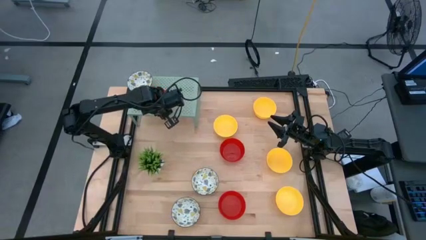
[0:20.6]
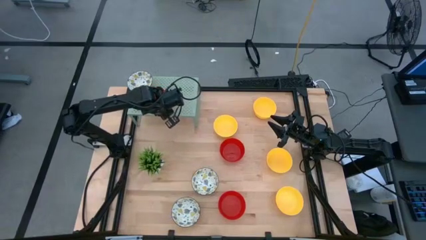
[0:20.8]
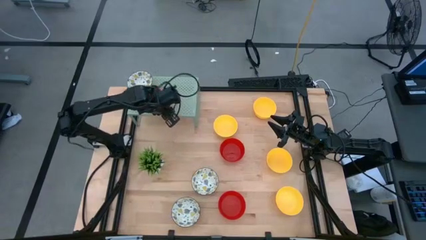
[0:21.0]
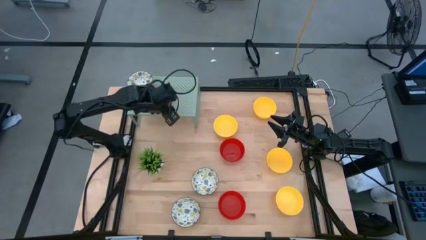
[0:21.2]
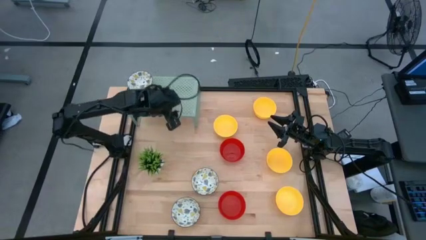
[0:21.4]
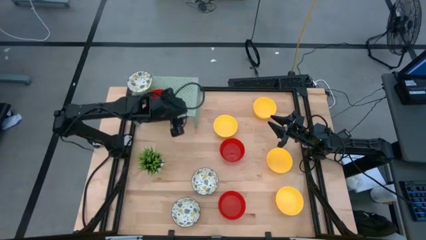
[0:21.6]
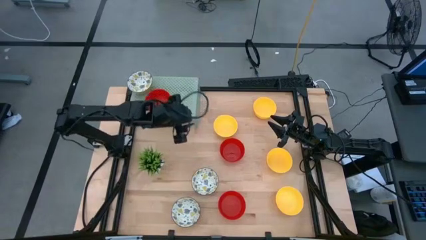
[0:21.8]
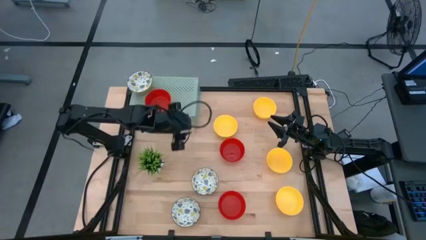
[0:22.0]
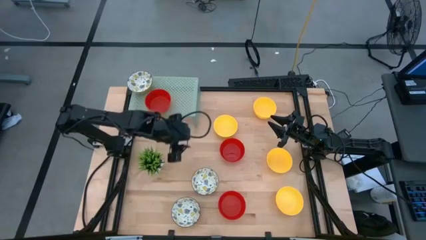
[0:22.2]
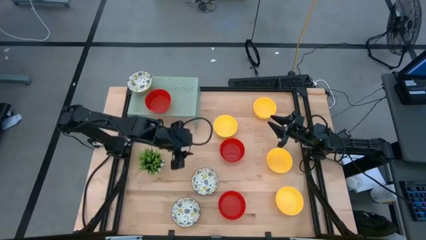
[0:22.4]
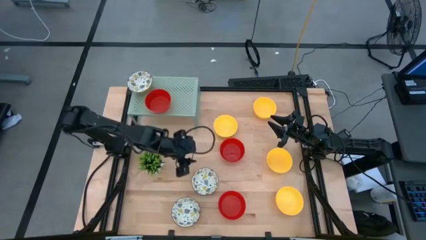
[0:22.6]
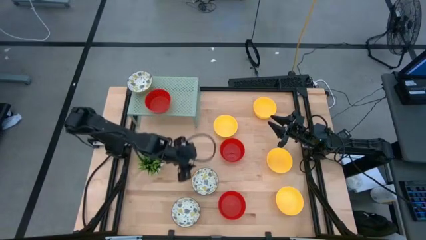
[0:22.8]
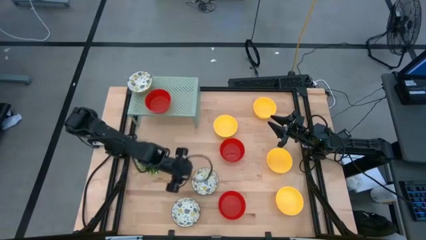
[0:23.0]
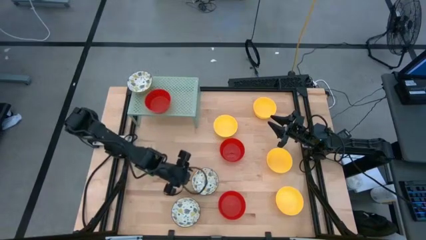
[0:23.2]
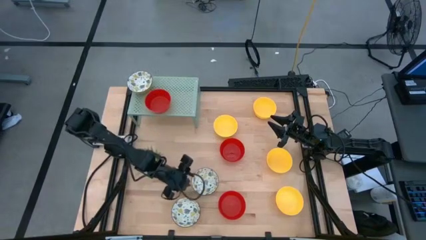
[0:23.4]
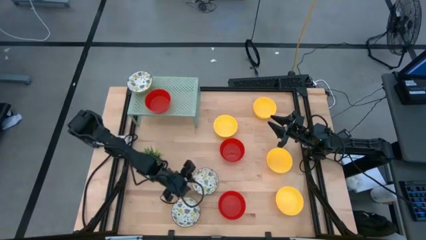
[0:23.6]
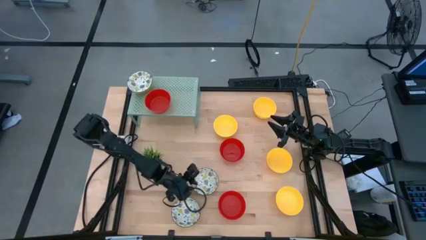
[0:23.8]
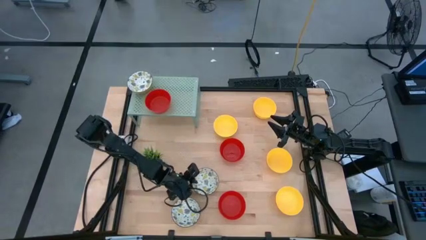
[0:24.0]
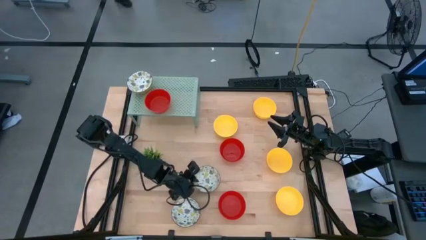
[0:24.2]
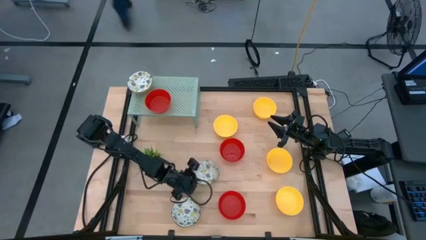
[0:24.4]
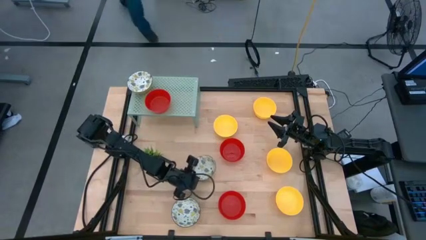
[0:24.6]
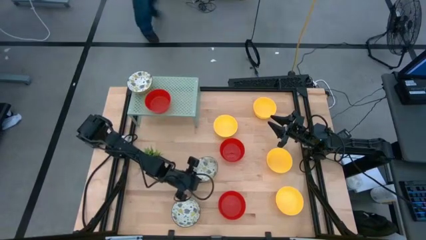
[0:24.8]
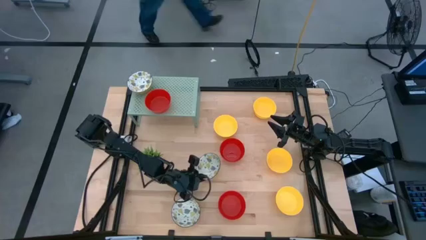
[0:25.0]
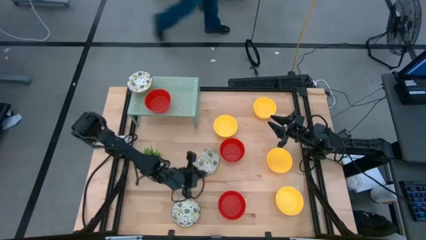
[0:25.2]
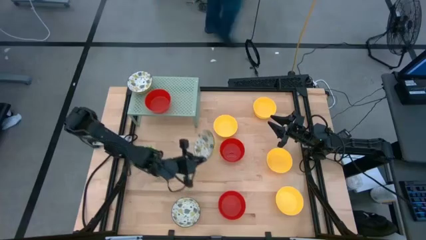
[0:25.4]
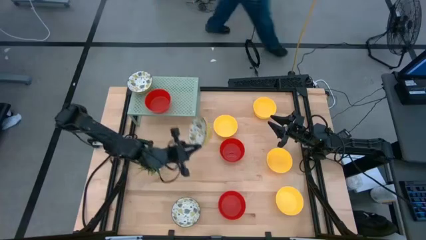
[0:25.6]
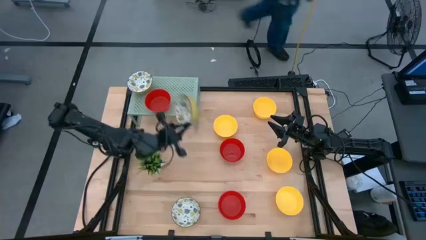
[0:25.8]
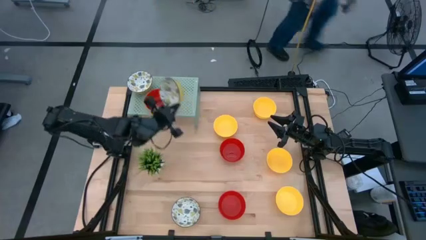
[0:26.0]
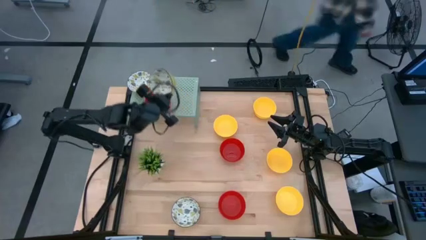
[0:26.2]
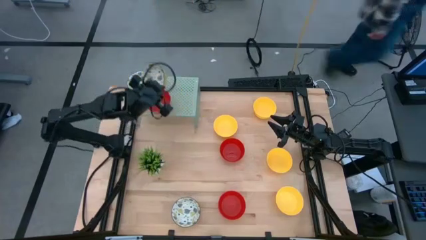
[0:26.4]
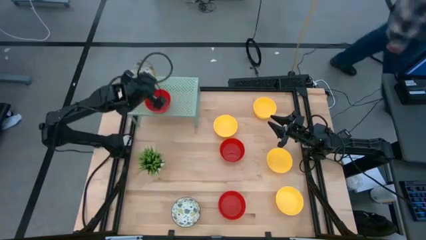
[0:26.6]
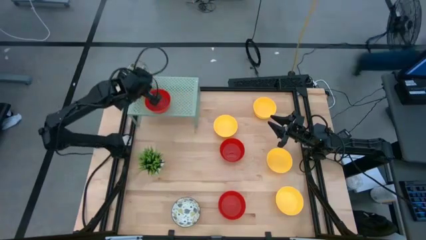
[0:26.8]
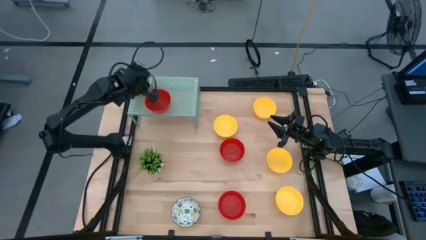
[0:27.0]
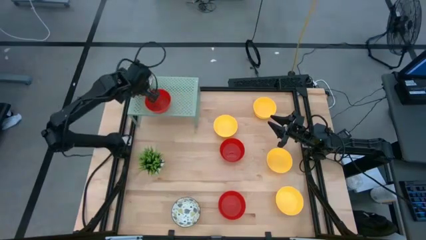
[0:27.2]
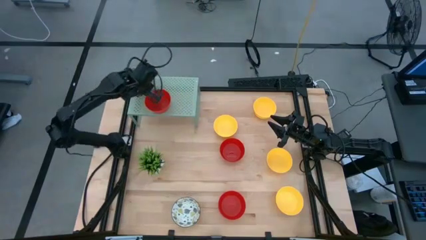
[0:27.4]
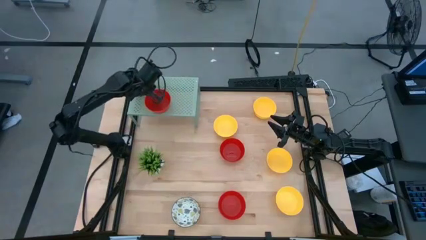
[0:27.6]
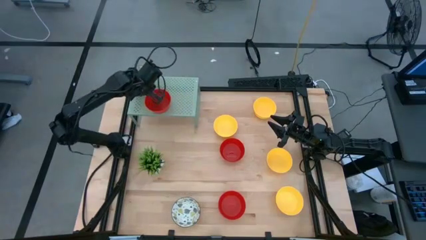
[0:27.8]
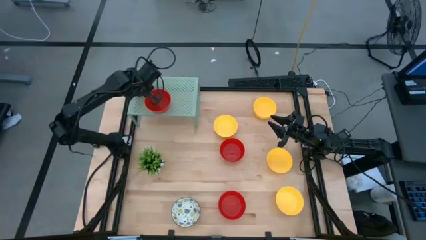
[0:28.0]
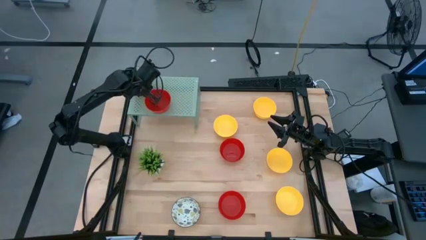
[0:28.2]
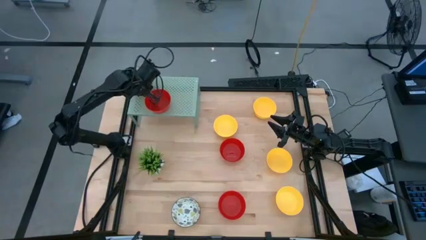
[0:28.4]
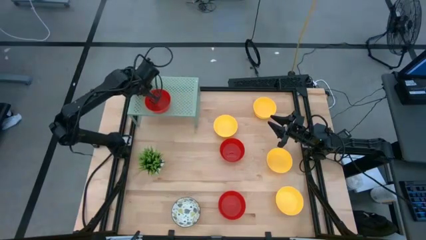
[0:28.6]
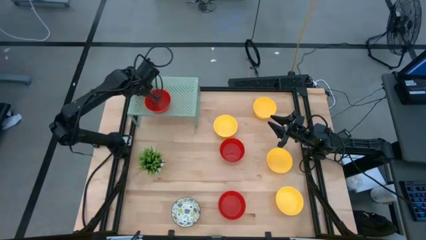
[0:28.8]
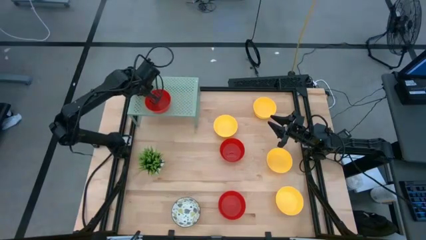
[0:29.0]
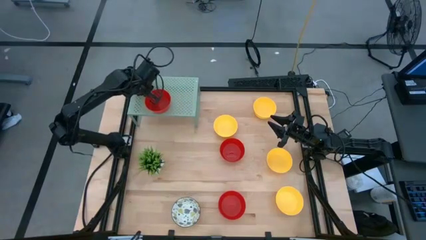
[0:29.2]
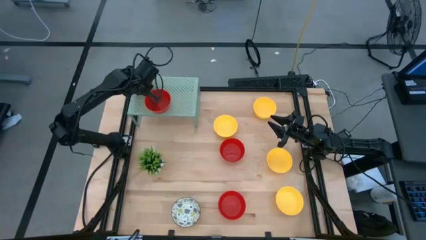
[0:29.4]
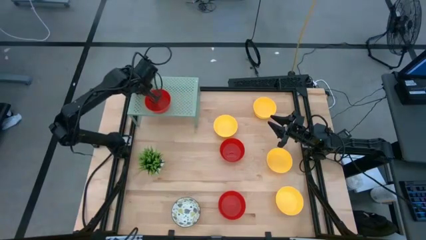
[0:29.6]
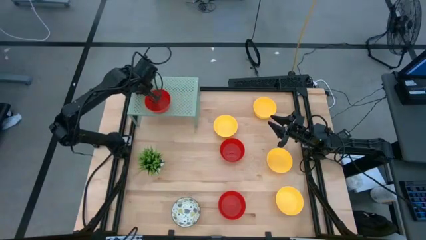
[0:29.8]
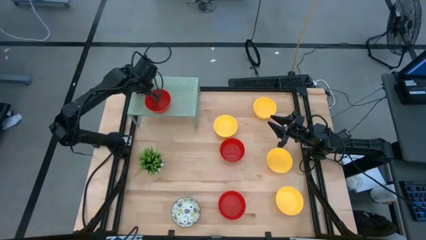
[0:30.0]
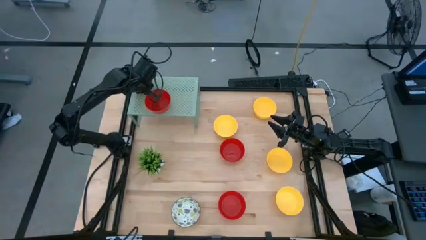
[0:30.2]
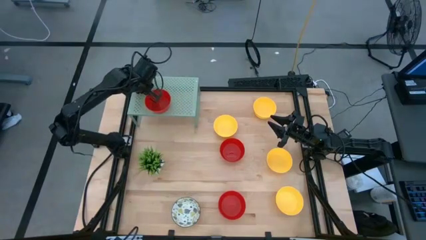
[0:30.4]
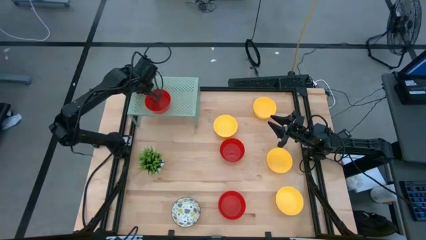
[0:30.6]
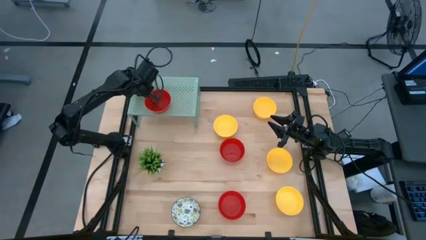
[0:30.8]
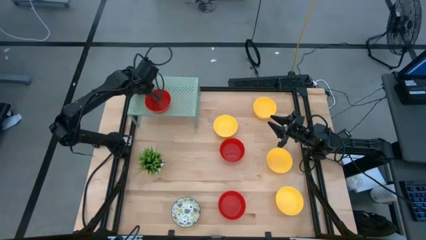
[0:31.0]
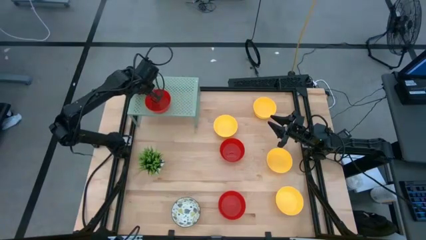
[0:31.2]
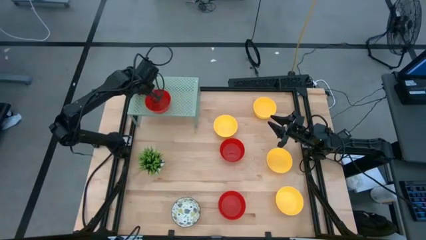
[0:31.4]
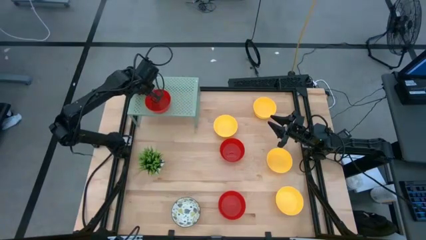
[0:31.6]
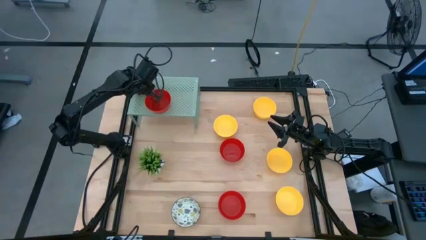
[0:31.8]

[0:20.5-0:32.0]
Task: Pick & Place Mini bowls
Stack the white patterned bowl on the white patterned bowl on the shelf

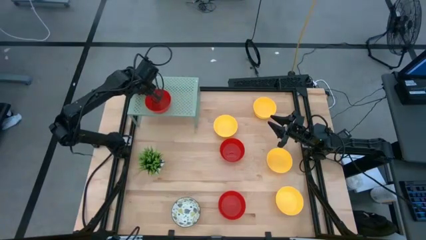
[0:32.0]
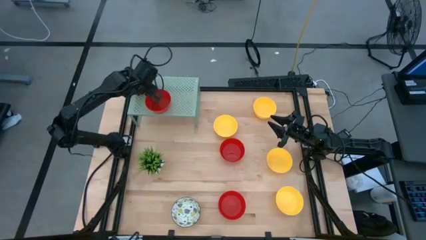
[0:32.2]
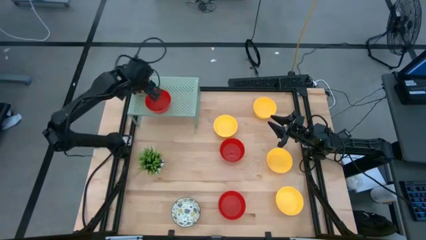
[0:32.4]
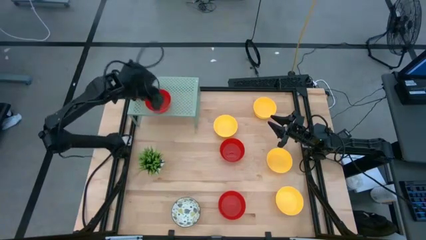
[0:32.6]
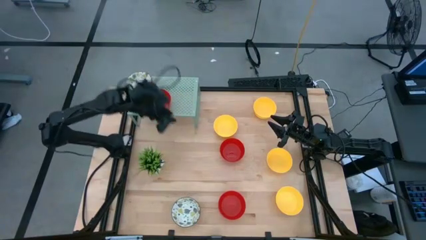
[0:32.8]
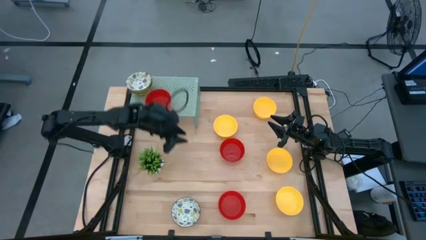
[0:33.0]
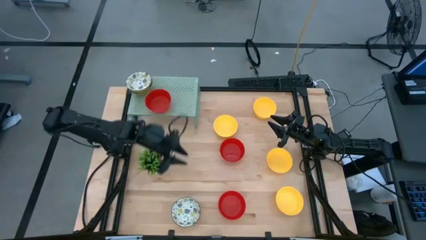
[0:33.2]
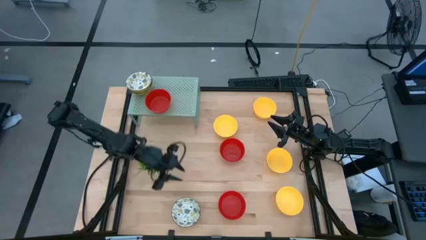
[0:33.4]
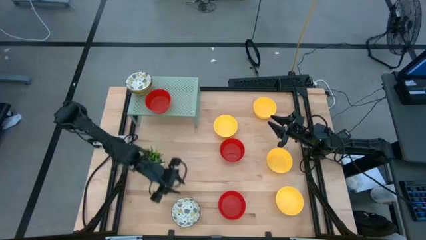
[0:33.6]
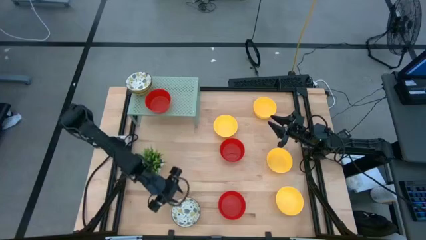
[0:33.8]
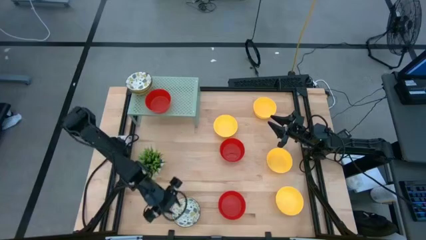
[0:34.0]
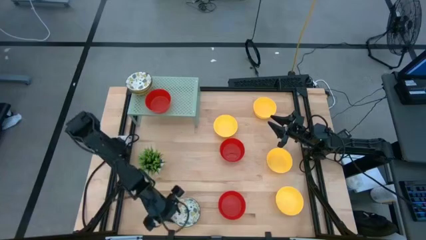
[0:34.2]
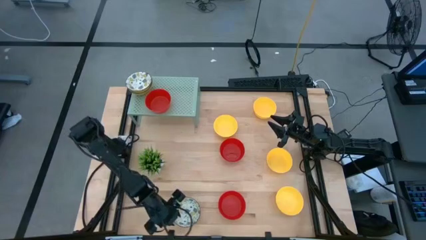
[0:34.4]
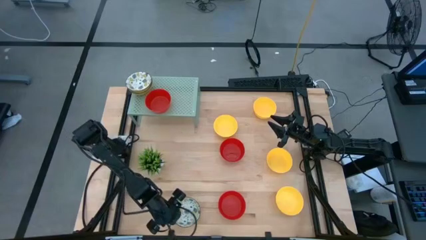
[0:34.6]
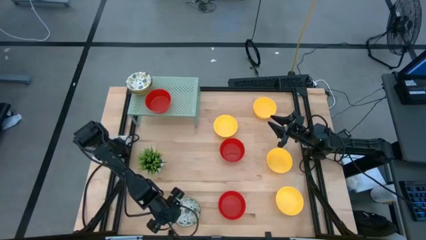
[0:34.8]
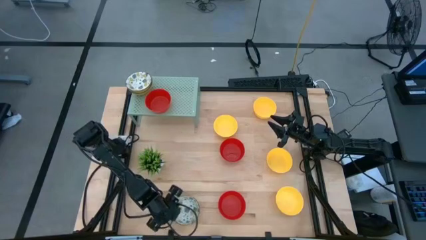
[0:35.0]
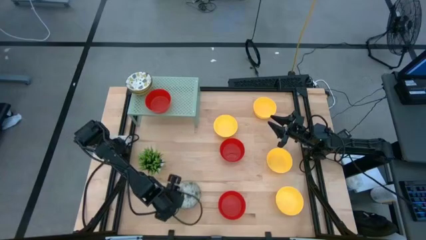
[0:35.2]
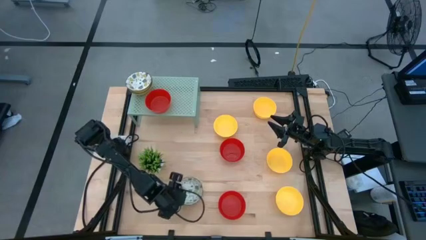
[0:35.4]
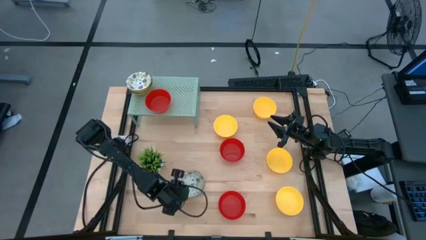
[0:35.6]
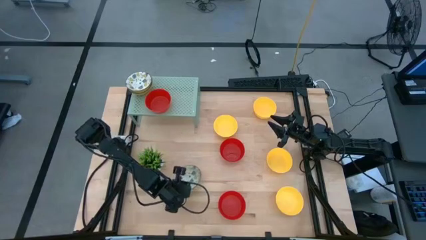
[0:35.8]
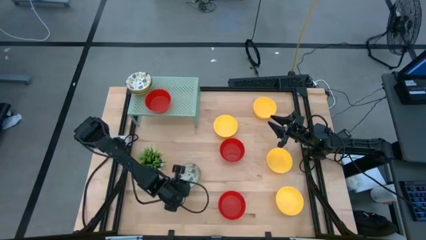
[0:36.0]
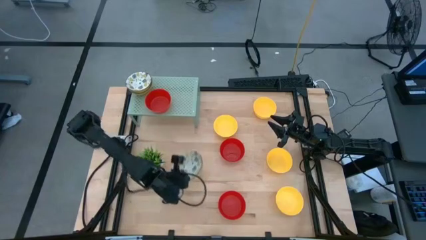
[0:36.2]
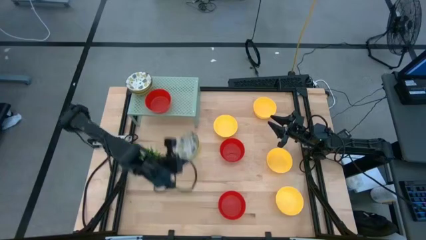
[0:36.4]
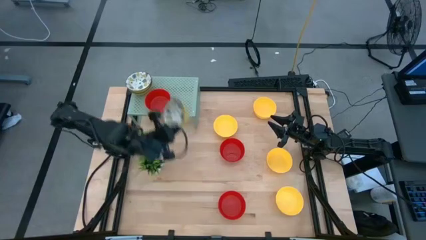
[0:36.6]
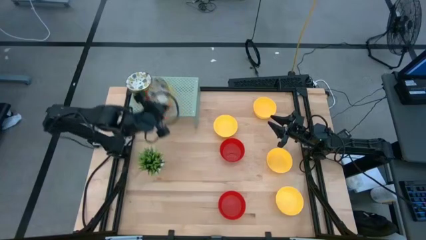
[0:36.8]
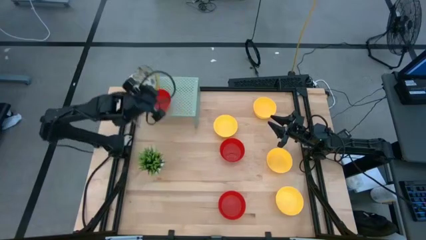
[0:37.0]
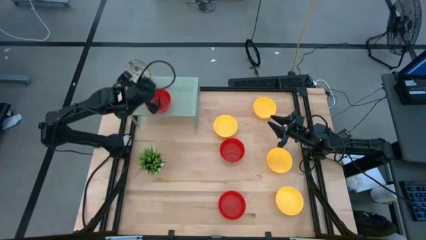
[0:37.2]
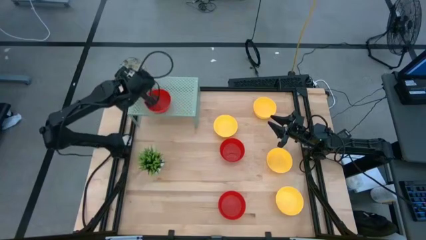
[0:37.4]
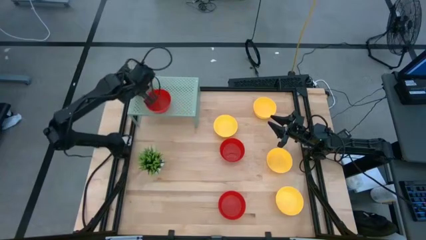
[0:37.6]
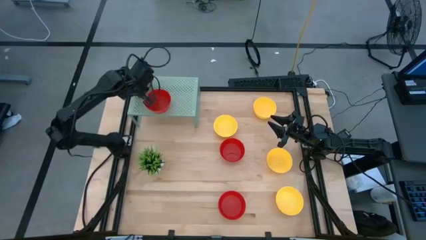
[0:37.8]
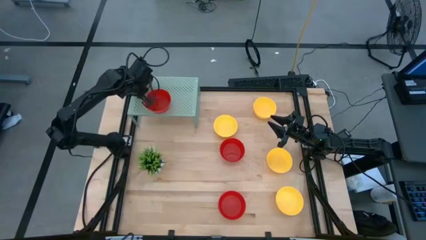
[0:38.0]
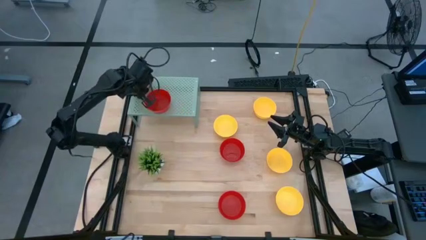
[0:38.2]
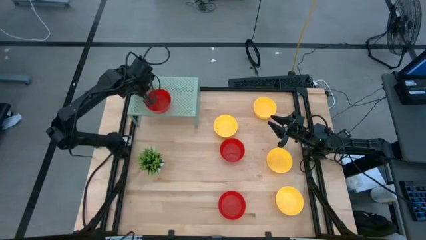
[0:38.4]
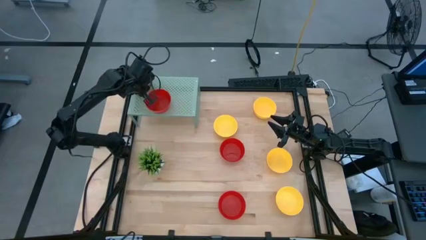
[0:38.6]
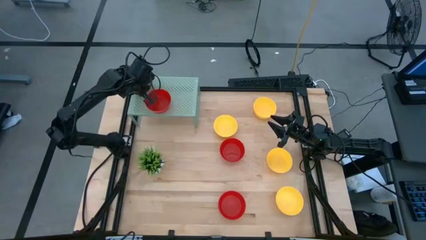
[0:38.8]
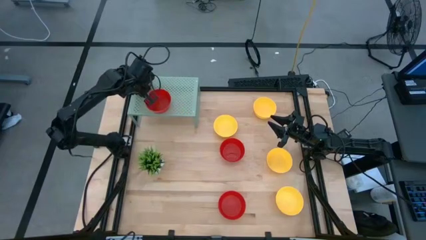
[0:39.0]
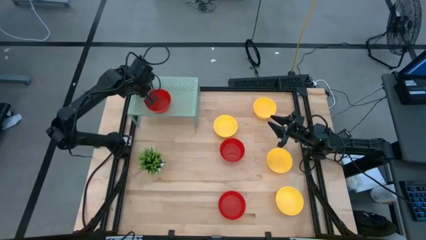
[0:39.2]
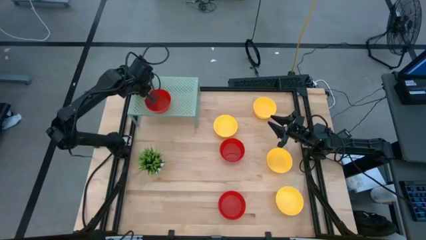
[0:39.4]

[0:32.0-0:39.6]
Stack the white patterned bowl on the white patterned bowls on the shelf
